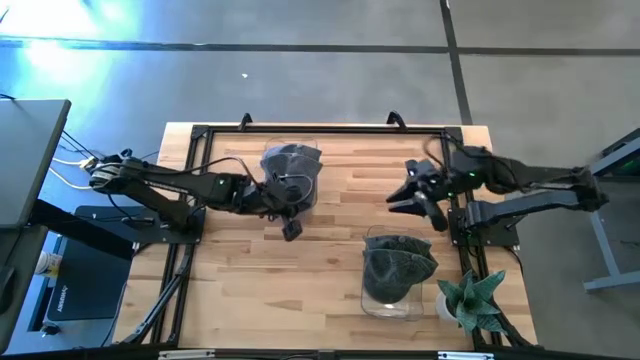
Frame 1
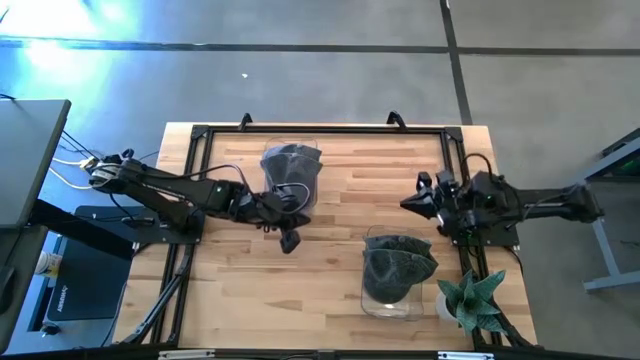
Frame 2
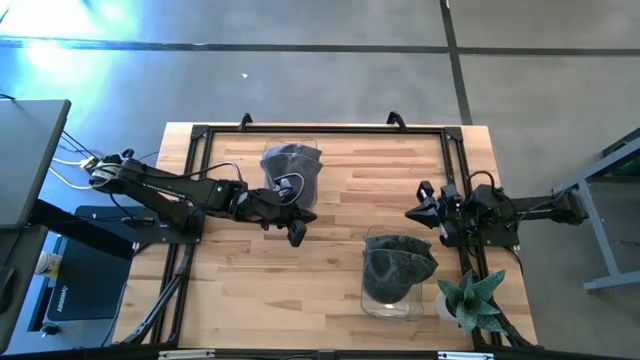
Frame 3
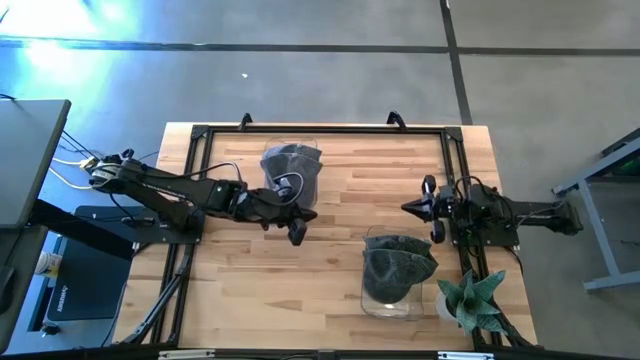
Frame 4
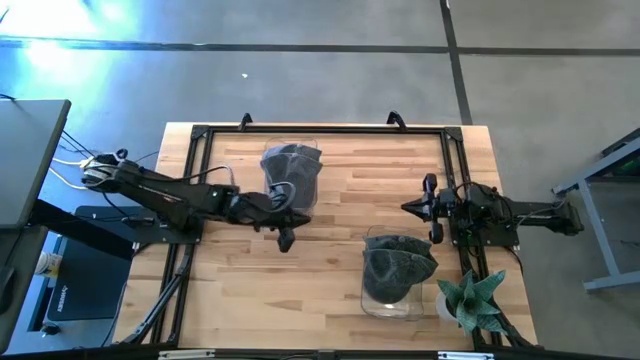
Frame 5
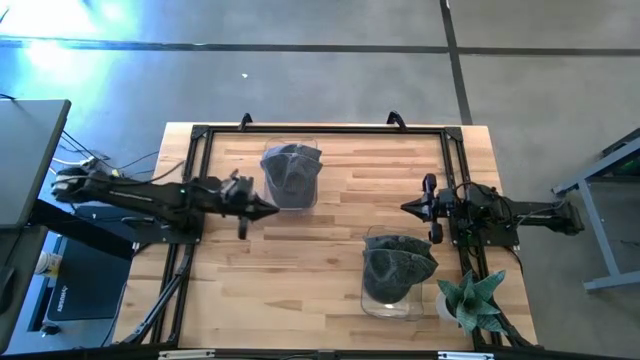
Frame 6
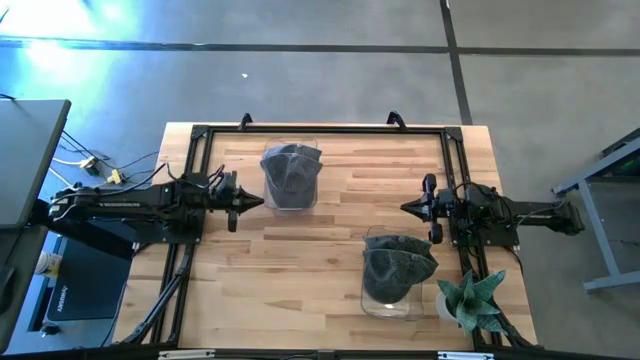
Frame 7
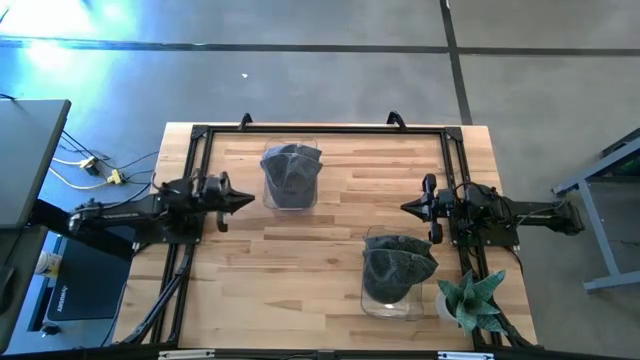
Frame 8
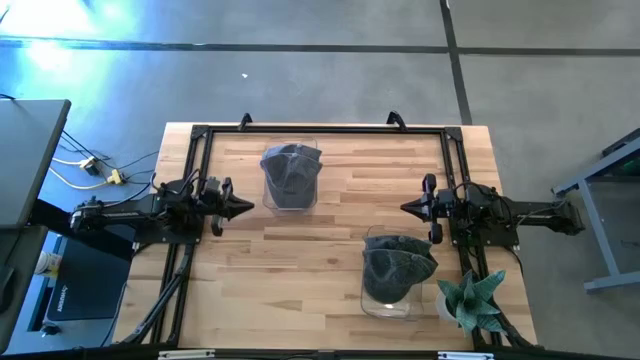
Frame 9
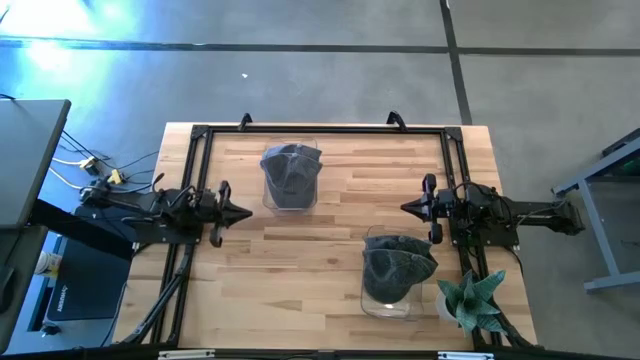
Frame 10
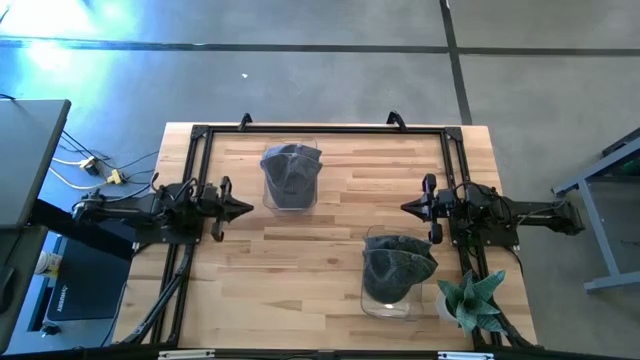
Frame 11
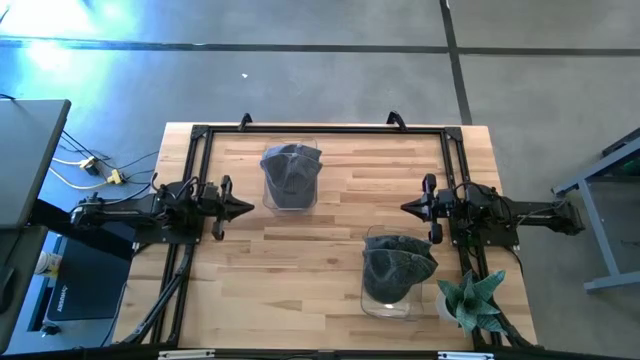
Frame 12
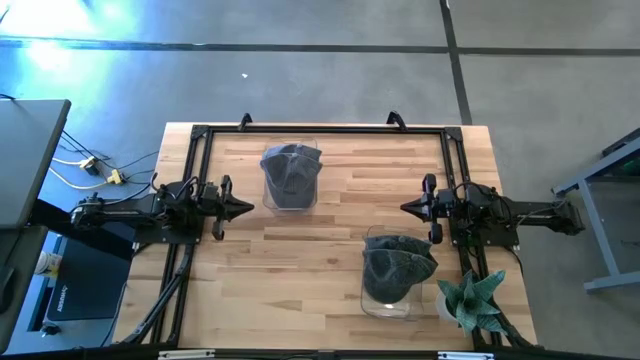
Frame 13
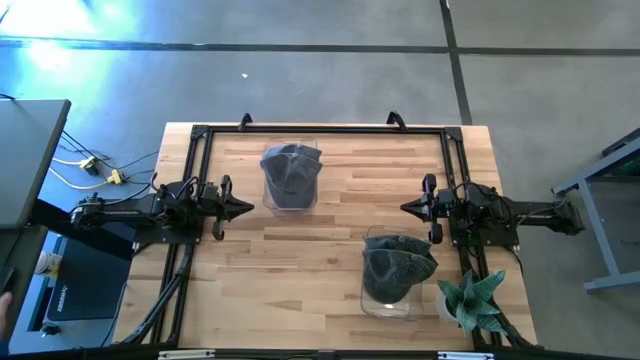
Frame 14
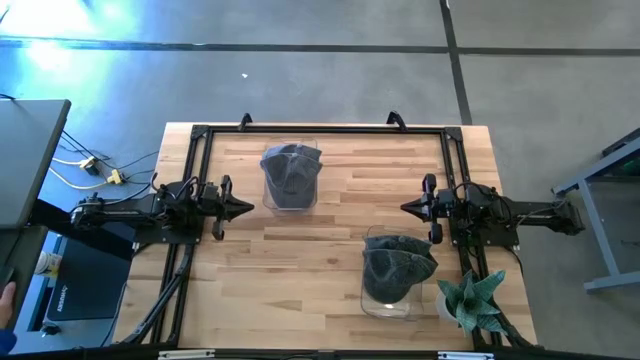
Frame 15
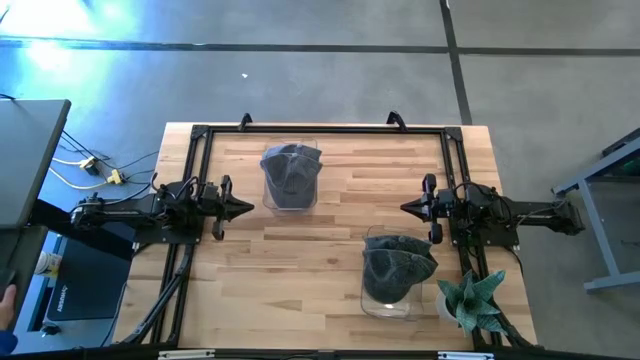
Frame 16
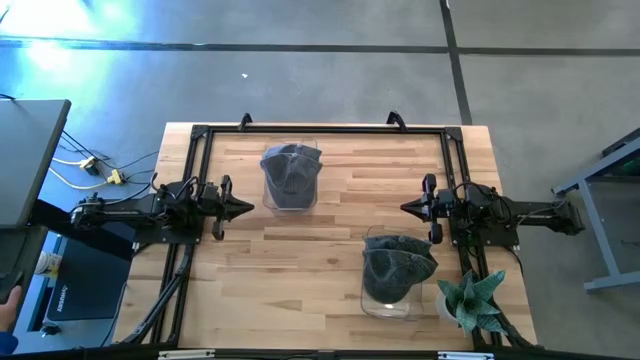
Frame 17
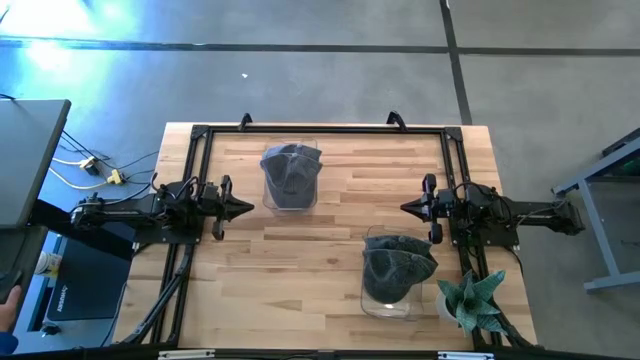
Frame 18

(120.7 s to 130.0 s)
Task: Pick & Place hat
Return to Home Position

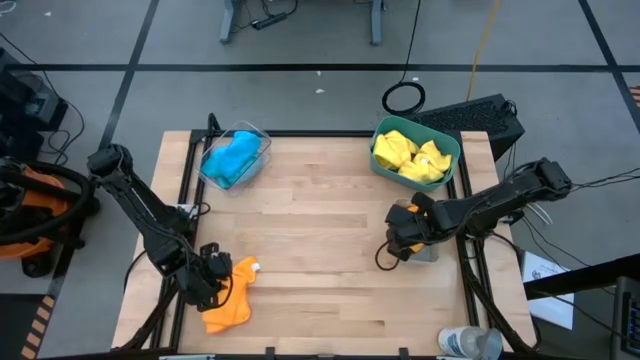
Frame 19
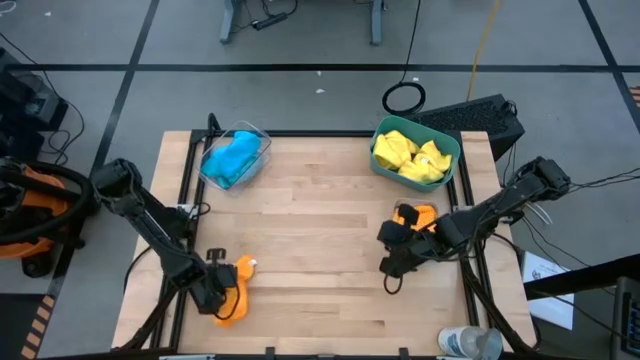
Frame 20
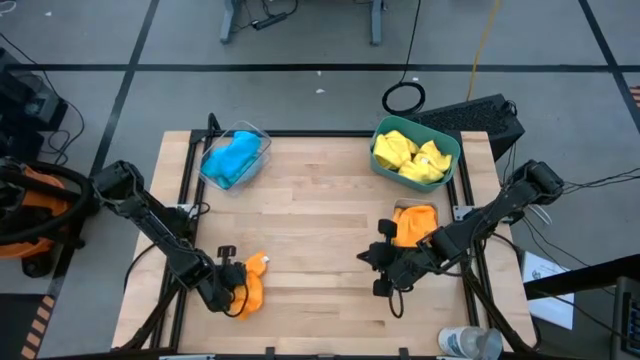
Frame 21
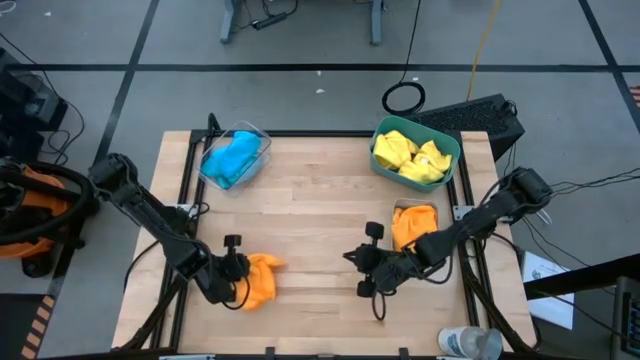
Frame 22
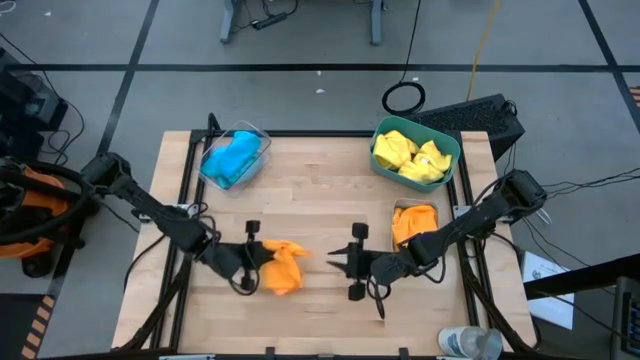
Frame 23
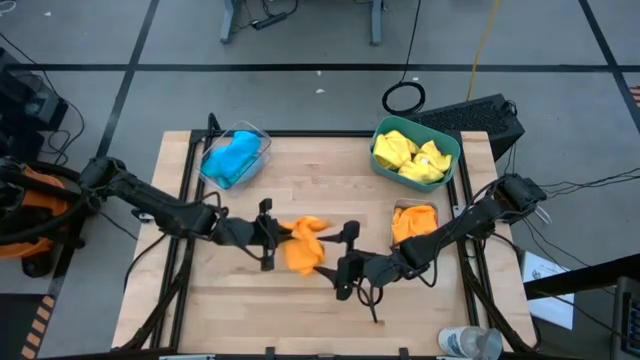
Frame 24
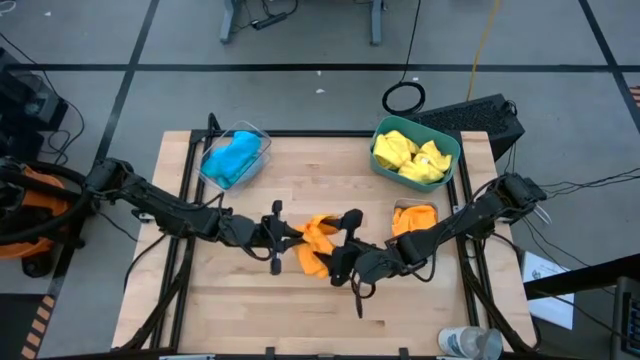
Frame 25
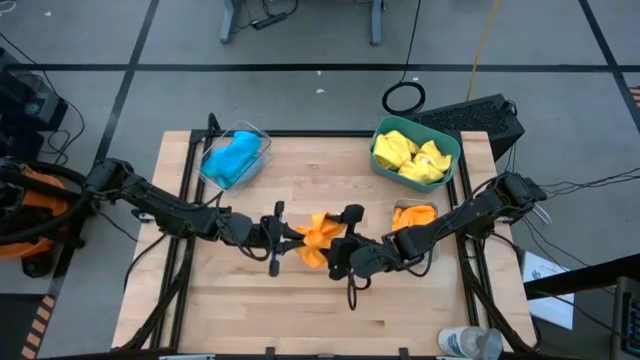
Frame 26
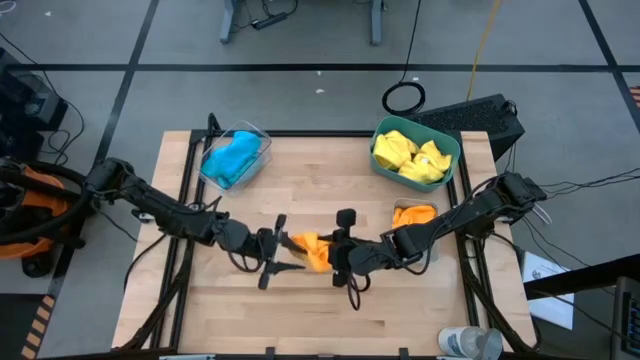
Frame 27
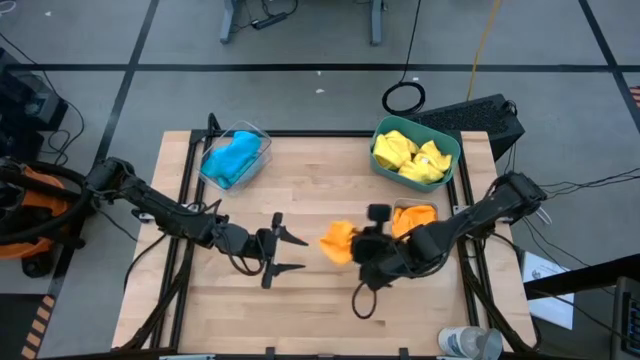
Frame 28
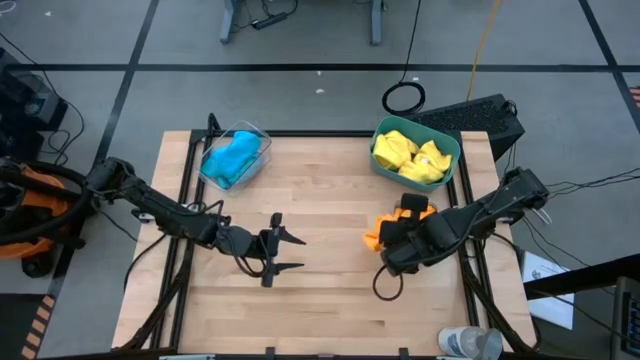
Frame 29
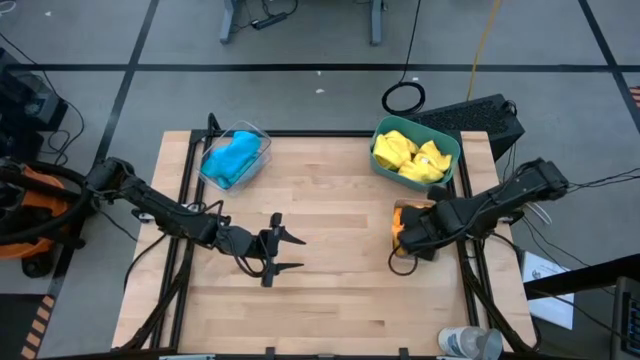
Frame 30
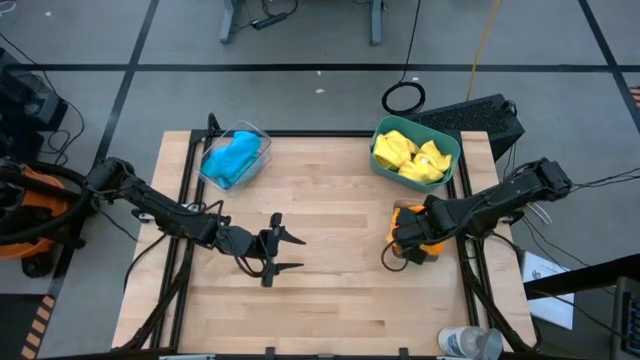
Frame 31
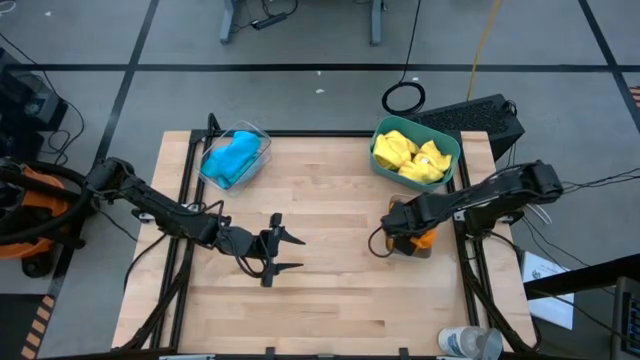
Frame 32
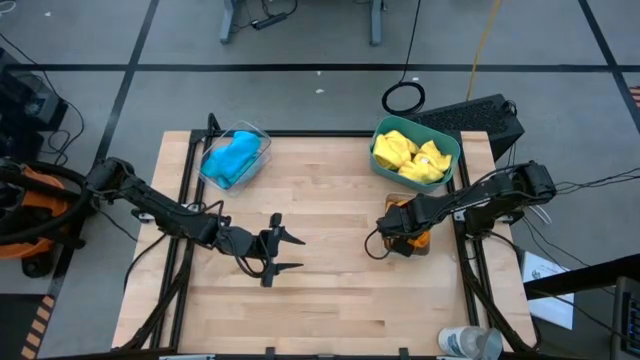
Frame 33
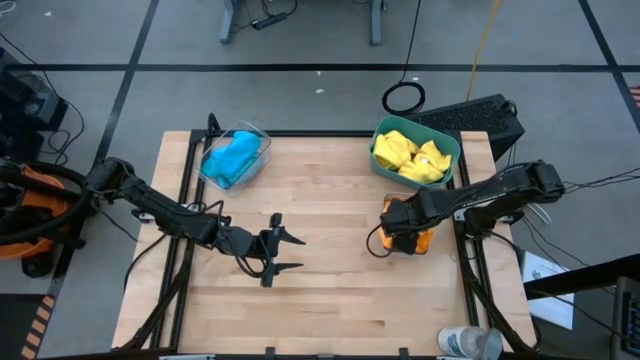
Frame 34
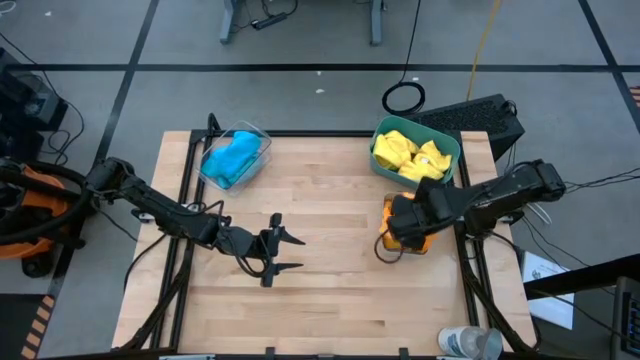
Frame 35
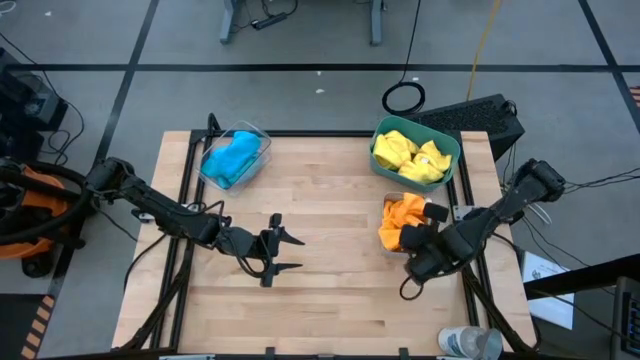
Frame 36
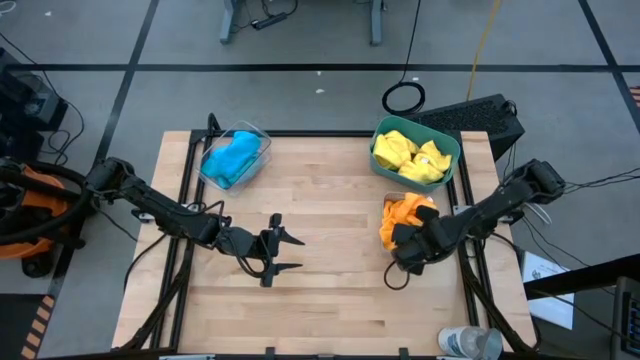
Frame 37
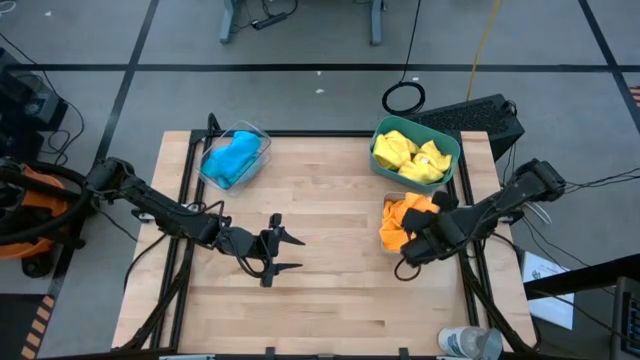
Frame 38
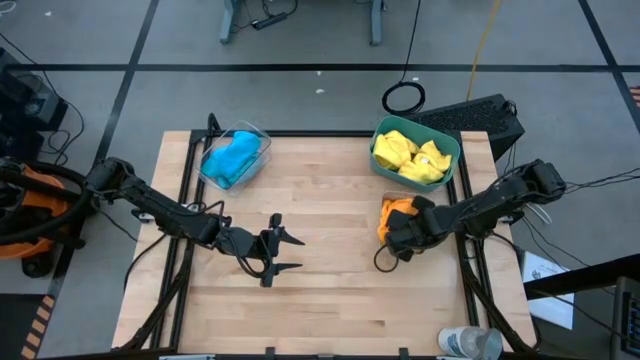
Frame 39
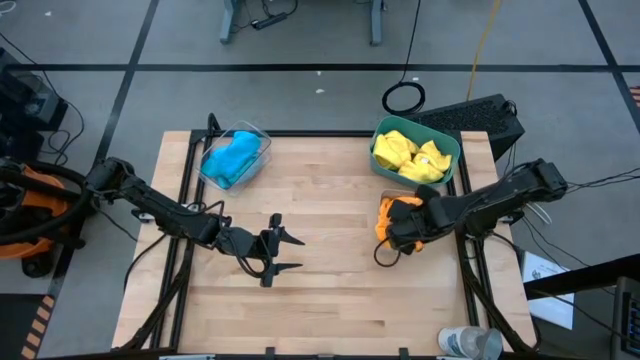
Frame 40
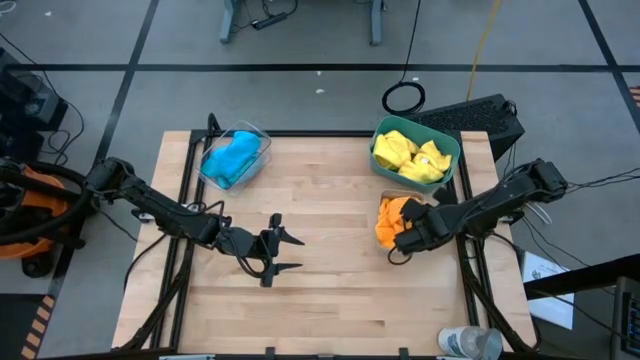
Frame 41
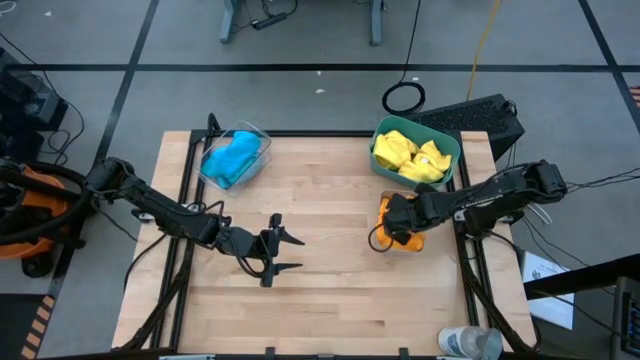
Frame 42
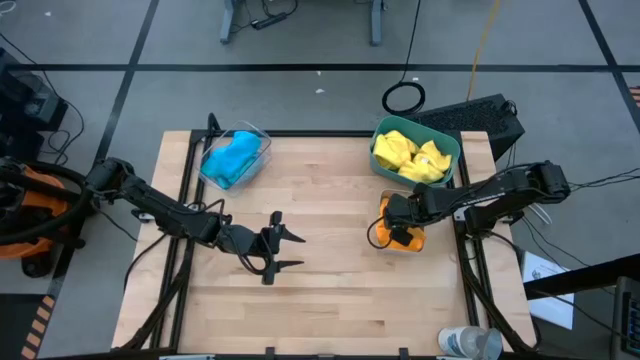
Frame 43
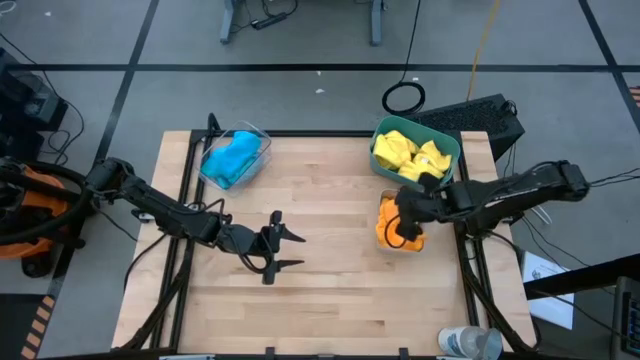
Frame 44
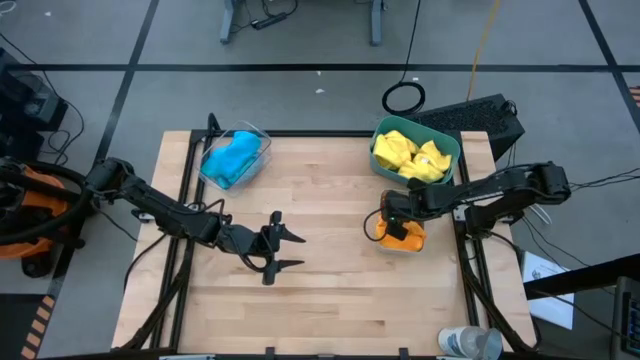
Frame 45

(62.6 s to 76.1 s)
Task: Sort microfiber towel by color & place in baskets
Put the orange towel into the grey bin
